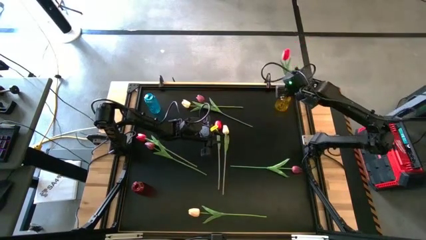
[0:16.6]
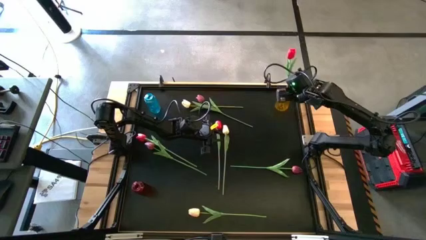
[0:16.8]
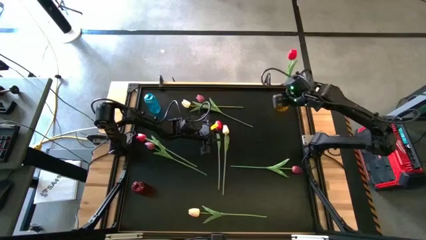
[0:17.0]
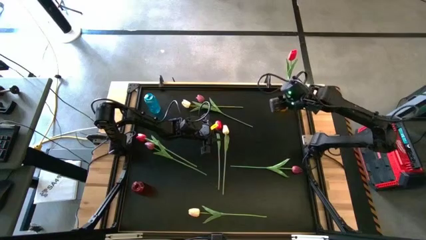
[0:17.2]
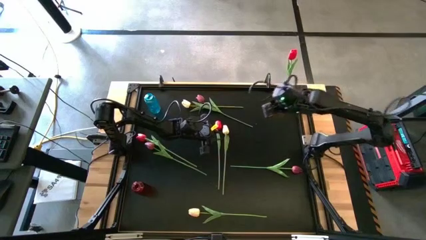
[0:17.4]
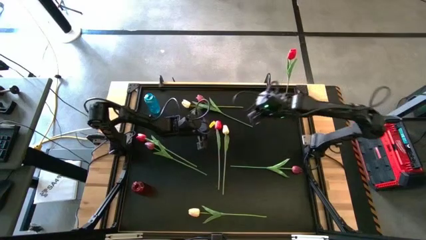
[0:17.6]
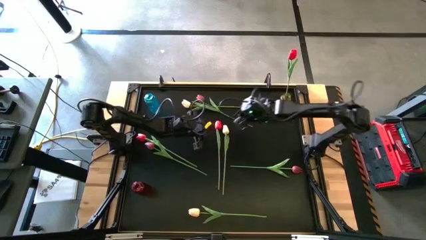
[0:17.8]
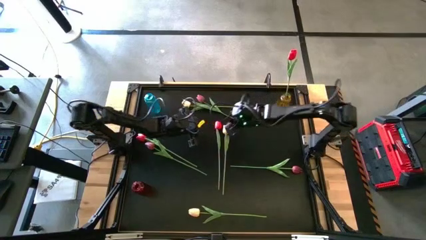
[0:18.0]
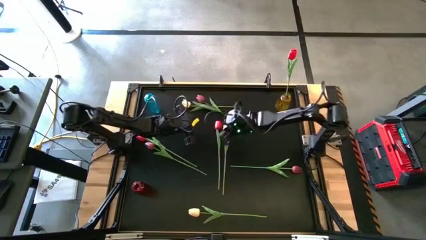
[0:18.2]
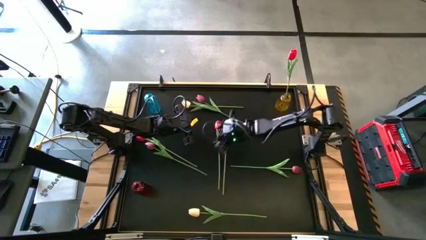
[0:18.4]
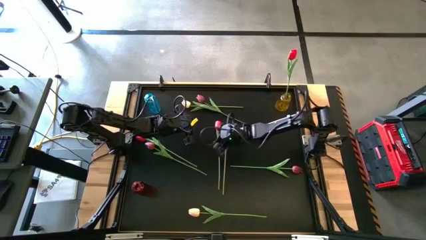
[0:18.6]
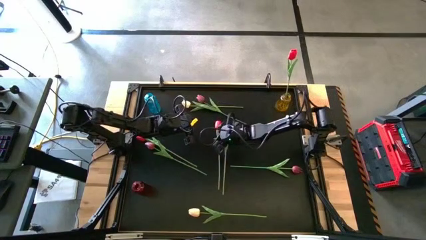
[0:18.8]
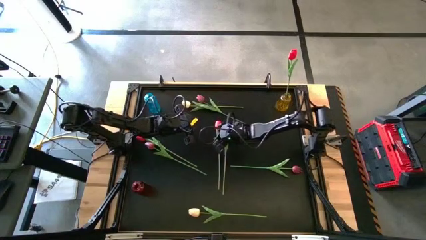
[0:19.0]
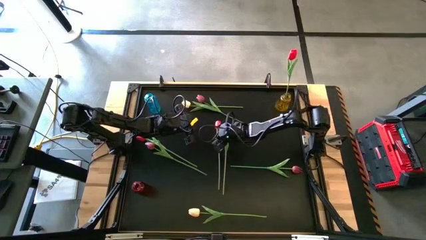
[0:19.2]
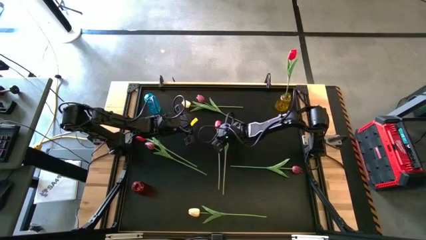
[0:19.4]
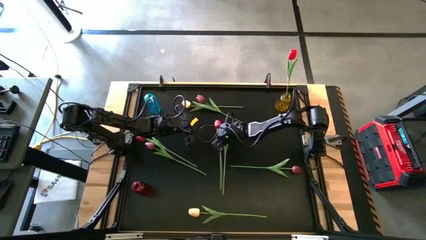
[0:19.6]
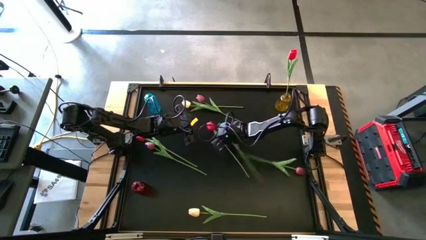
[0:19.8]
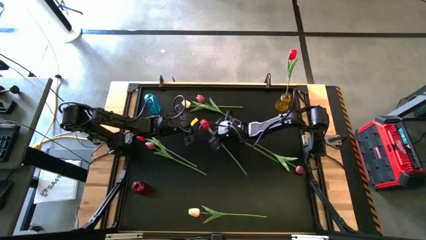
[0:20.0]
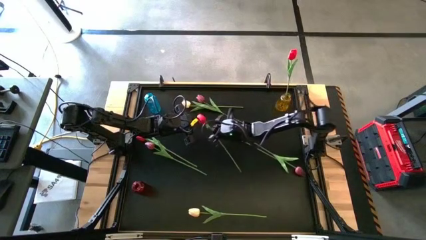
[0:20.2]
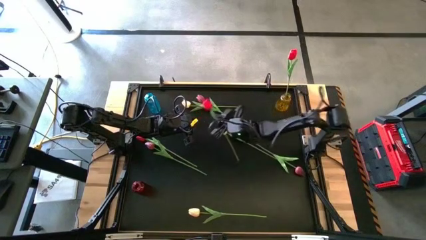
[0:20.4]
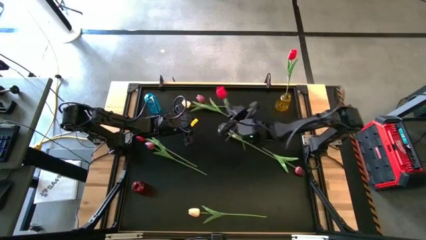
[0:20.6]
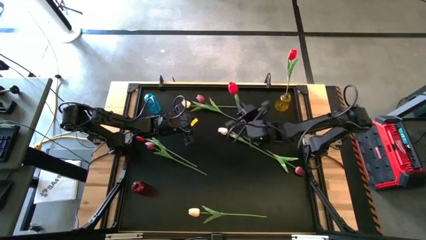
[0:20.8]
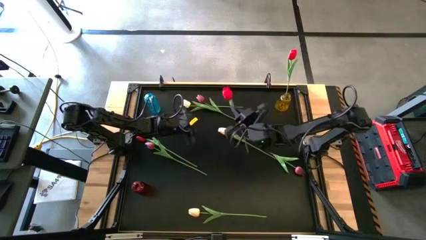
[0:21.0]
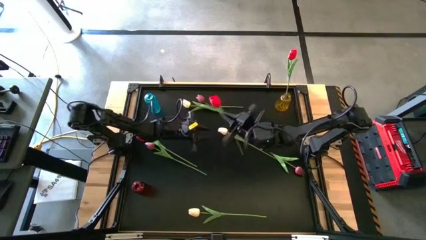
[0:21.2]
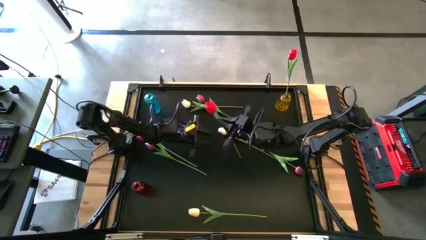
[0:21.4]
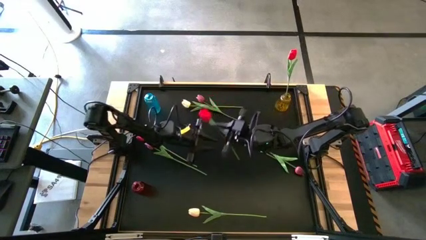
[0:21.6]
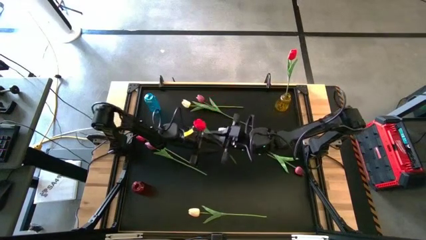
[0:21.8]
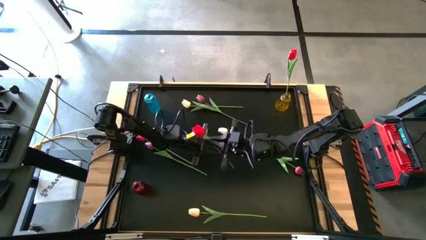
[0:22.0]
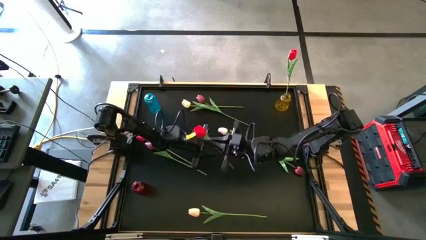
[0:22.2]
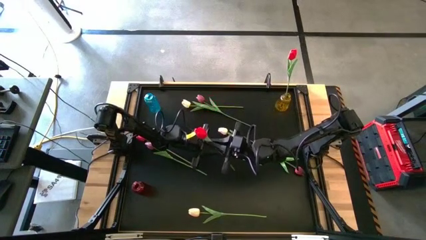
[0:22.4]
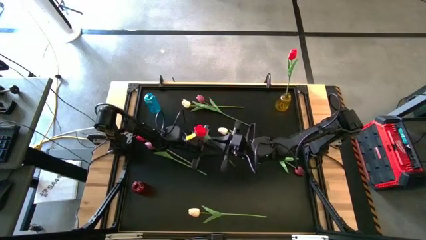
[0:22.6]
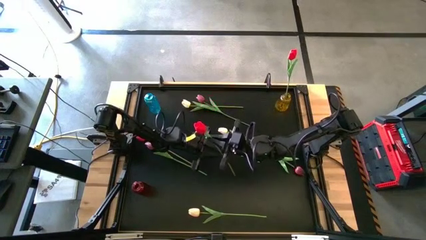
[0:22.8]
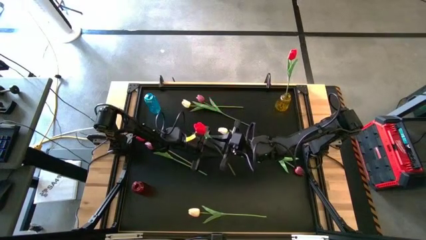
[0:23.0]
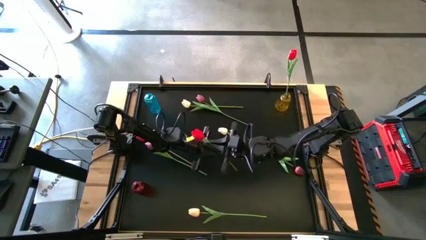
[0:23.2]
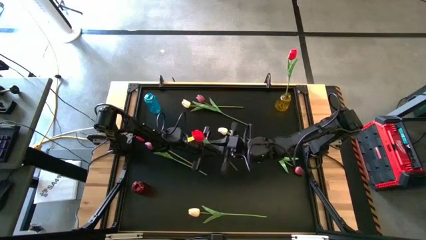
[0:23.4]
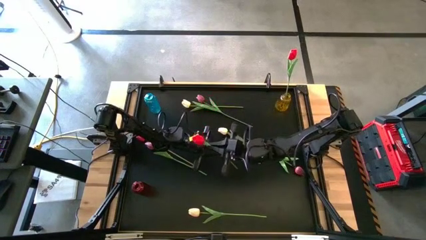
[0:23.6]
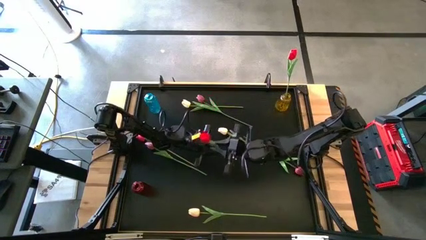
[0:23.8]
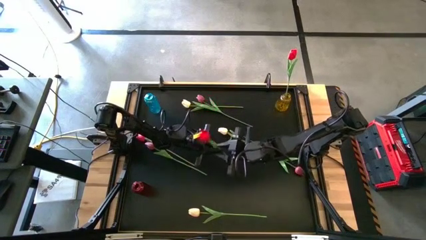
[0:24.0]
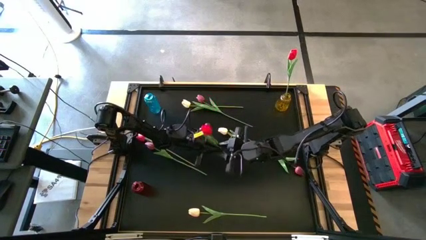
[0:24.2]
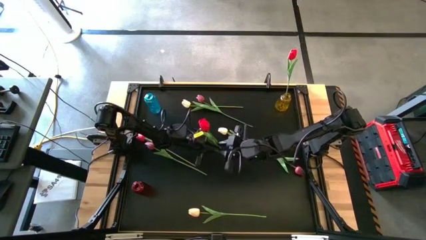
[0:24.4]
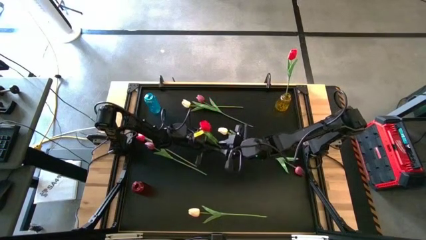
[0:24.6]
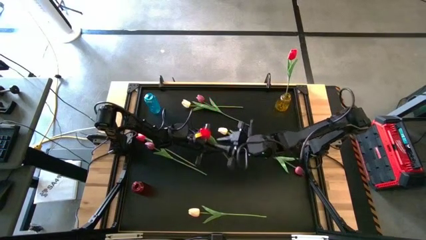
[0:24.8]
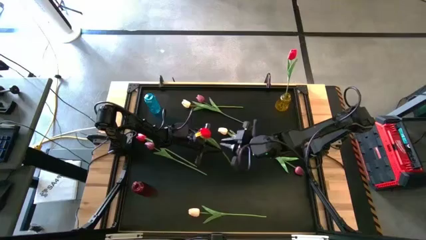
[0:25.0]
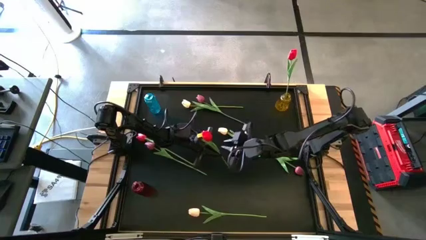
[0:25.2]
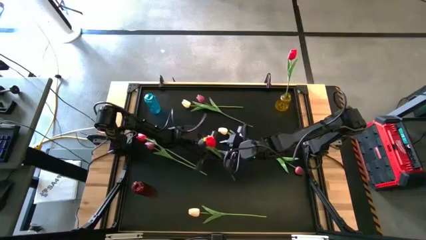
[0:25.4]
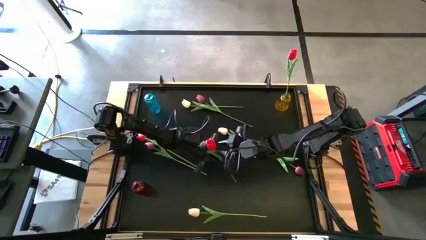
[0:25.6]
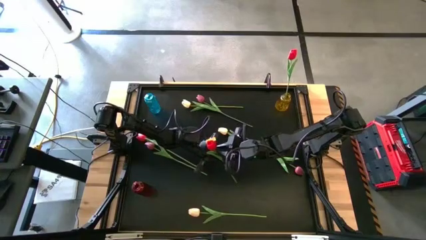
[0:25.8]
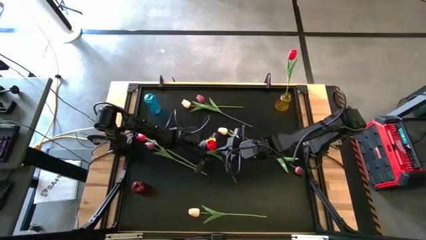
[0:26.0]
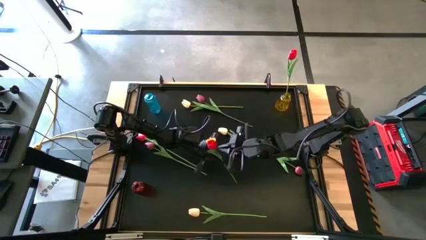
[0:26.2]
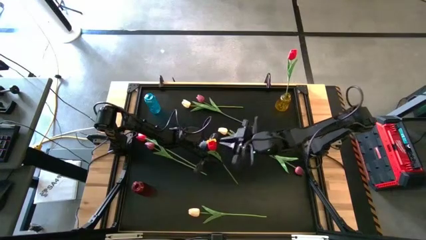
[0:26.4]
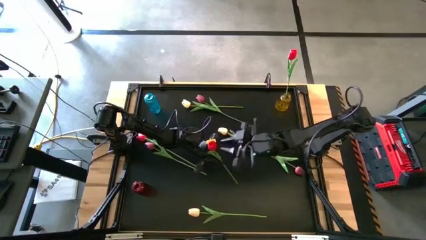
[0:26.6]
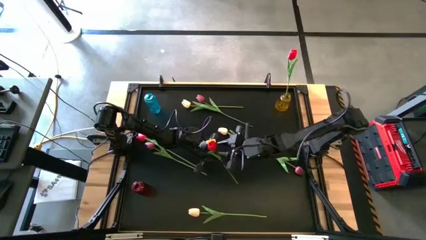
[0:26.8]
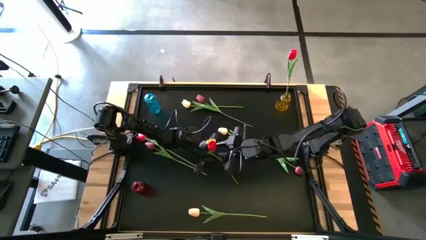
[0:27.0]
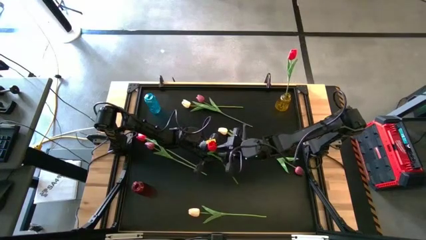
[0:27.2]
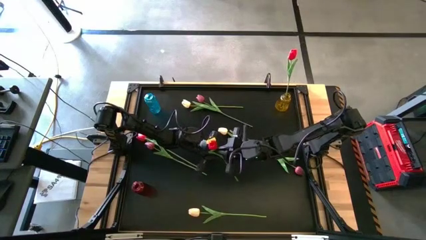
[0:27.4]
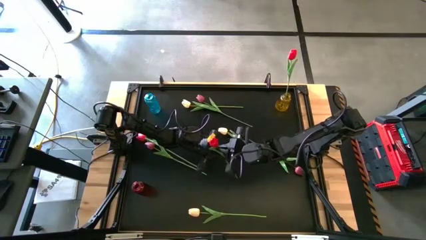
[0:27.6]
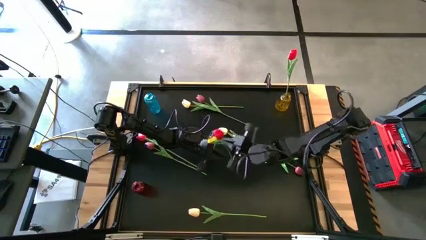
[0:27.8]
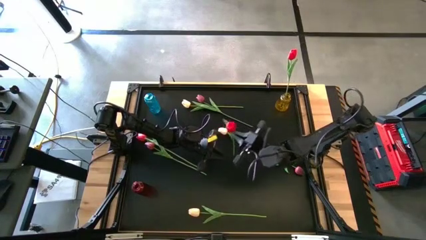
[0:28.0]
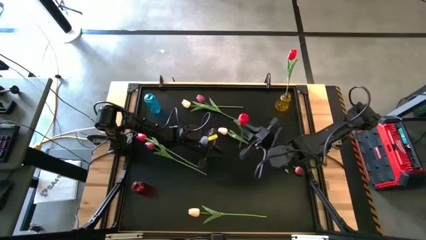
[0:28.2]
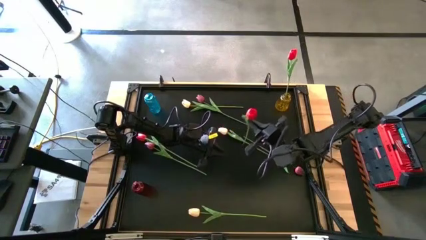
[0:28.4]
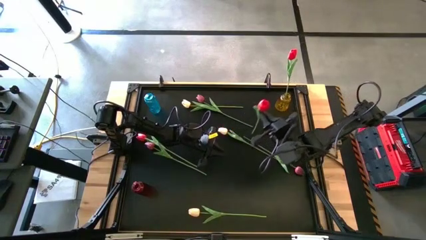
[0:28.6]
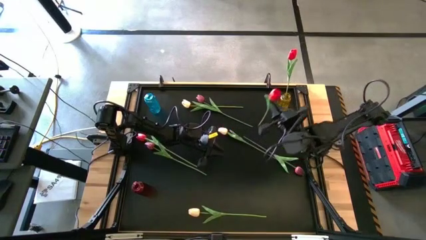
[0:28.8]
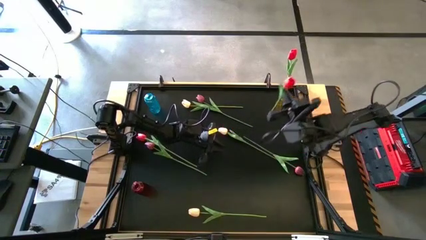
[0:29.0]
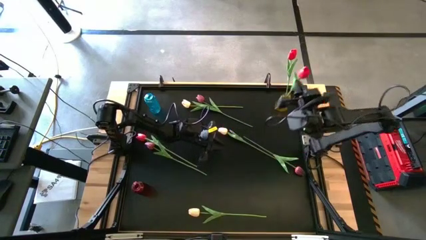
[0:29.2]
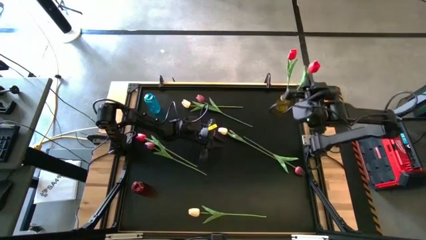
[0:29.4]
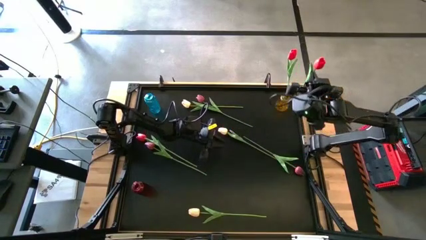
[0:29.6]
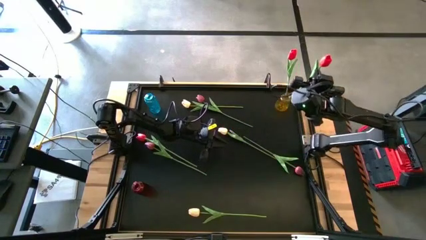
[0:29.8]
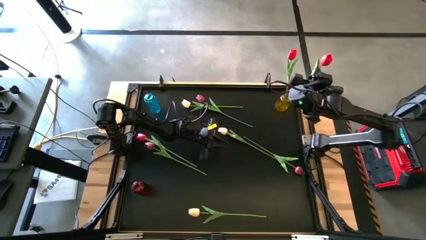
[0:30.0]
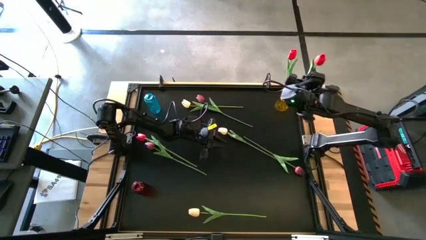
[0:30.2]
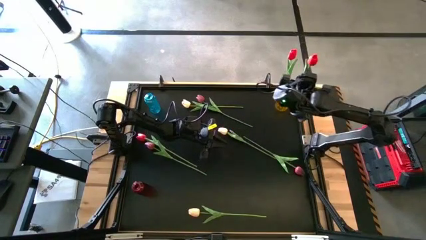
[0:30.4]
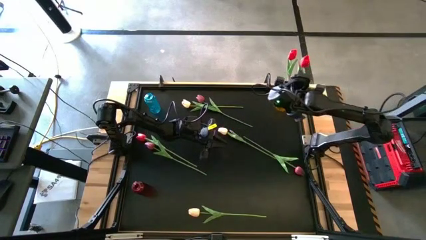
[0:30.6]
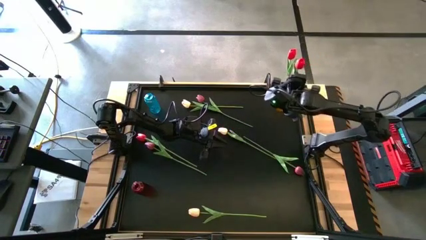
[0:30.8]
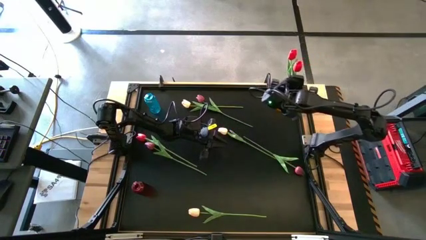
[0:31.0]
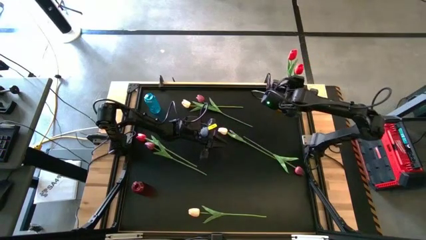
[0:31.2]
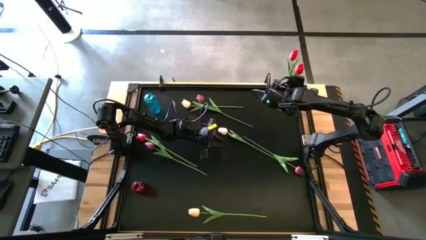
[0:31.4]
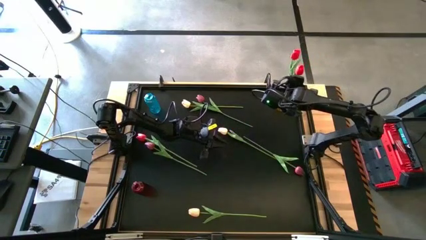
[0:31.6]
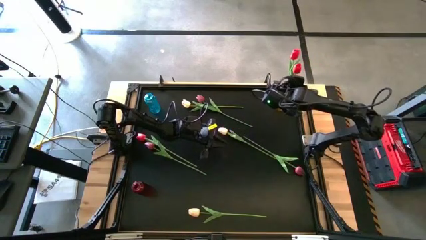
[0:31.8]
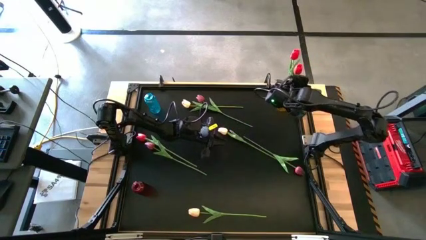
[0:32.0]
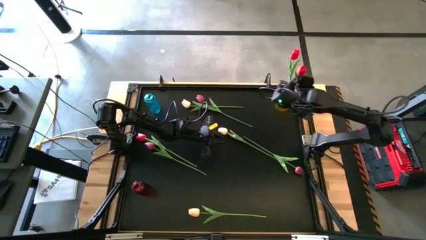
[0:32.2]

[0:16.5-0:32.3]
Task: Sort flowers into vase by color
Put the right red tulip into the yellow vase
